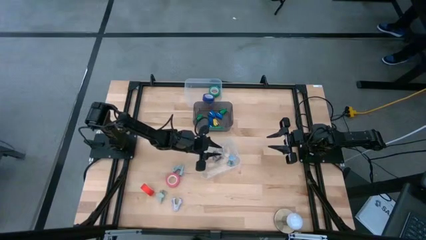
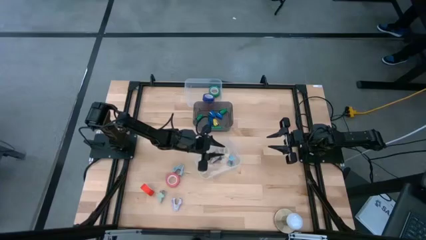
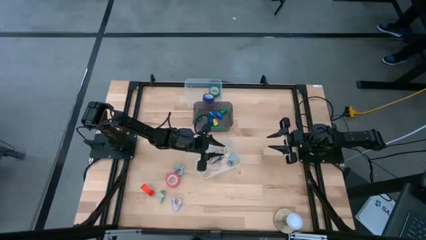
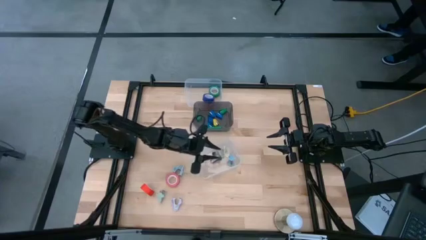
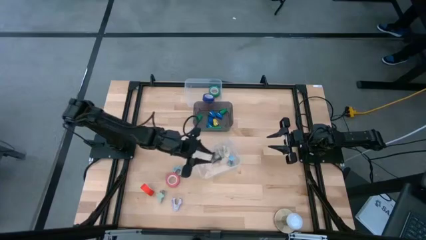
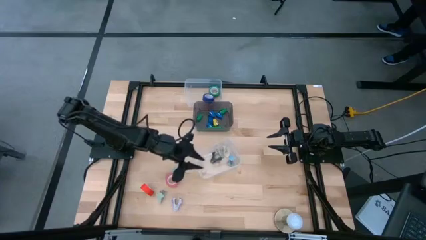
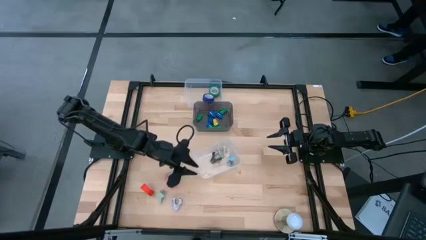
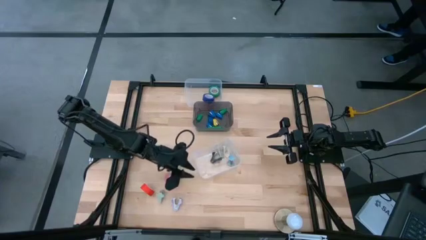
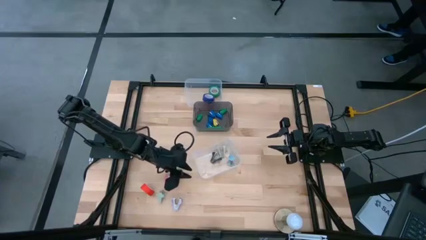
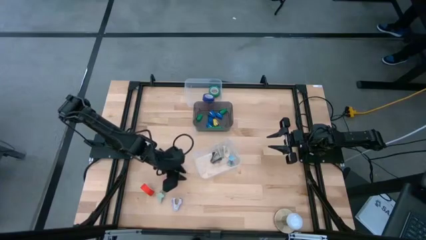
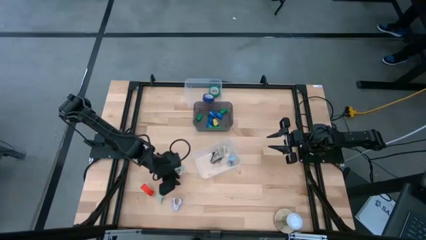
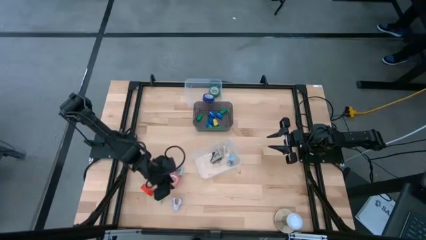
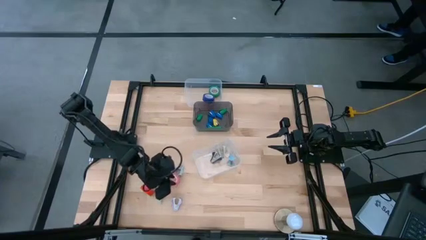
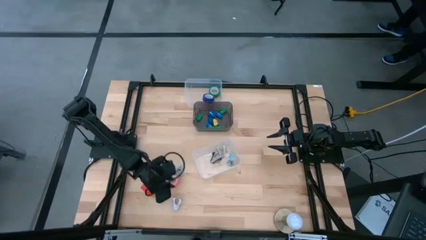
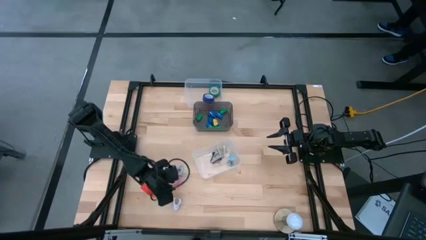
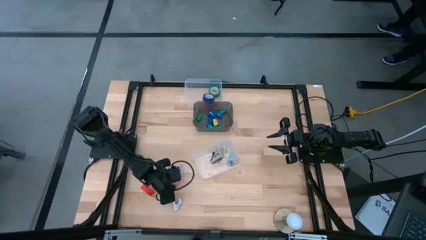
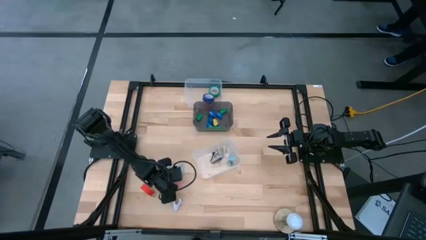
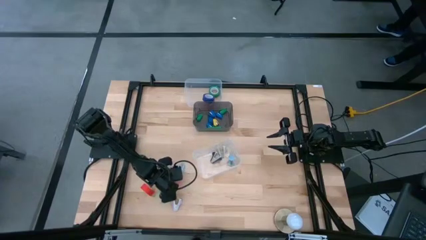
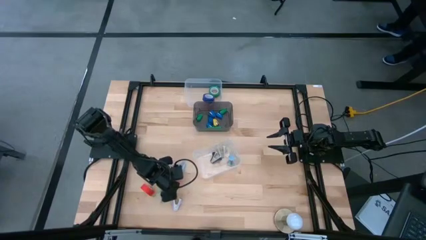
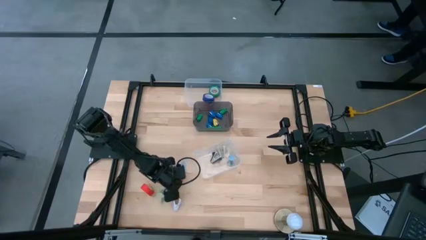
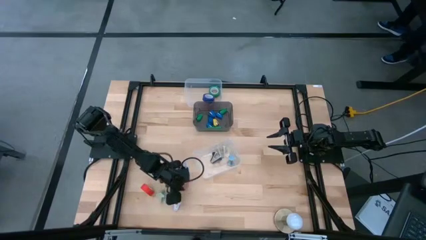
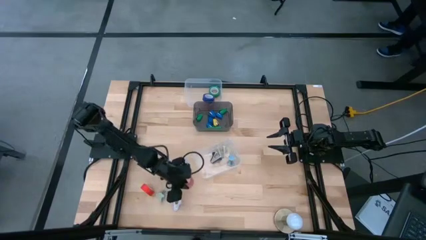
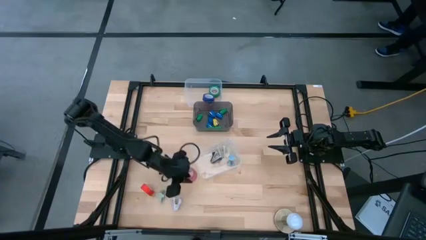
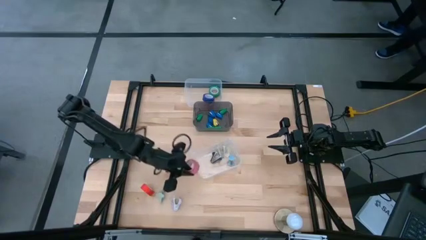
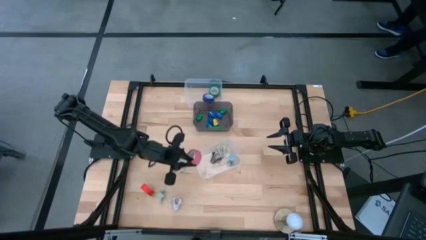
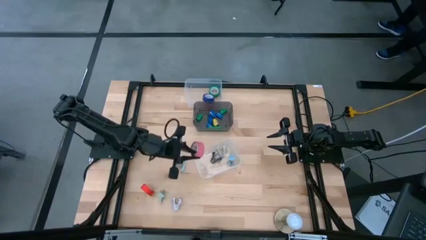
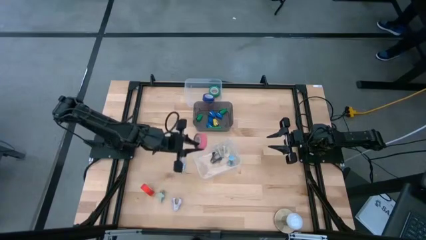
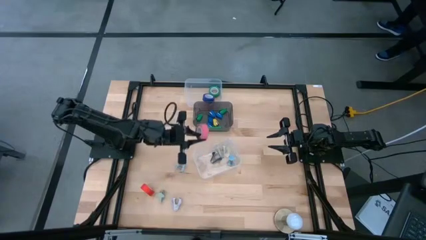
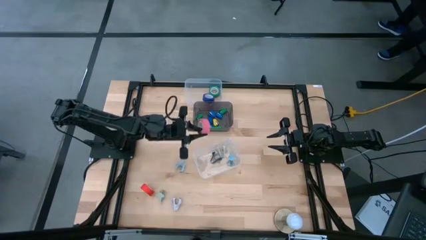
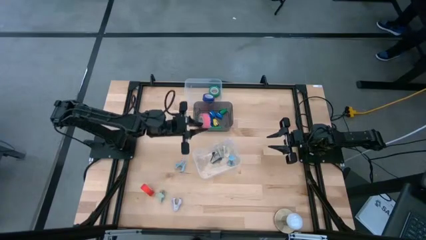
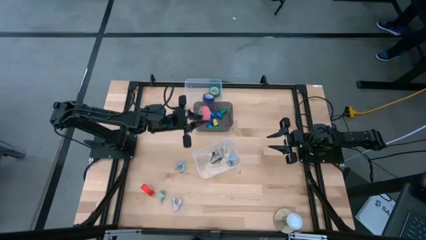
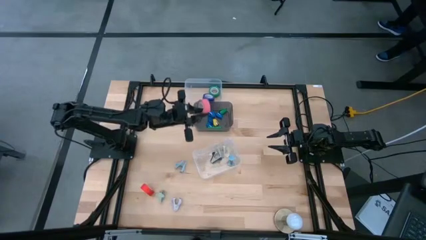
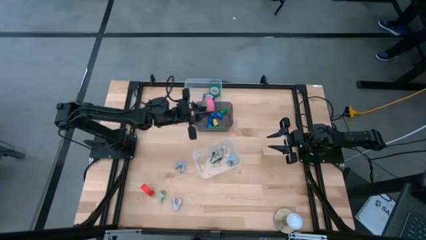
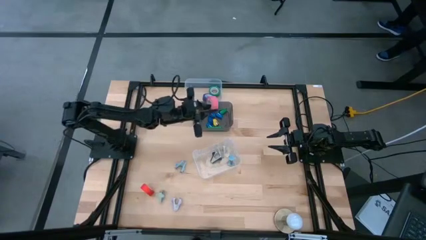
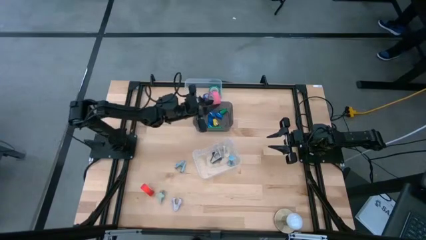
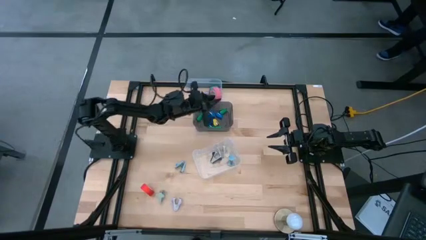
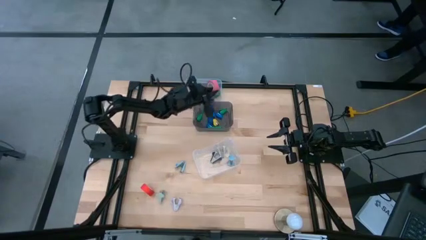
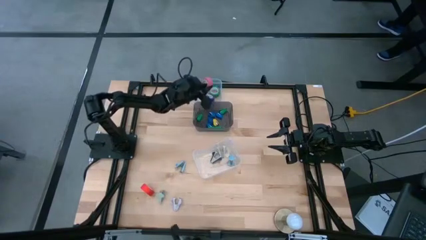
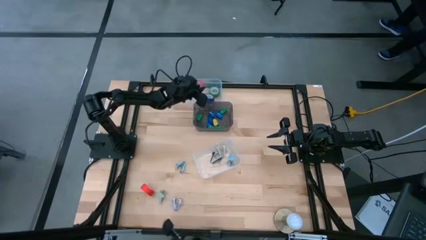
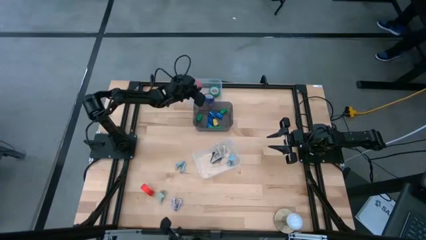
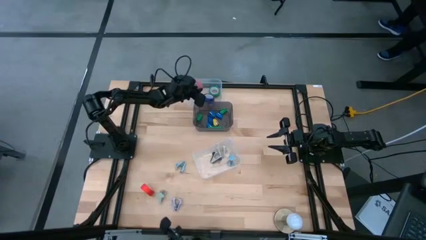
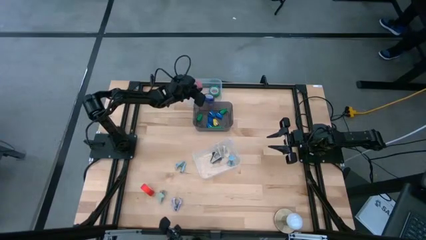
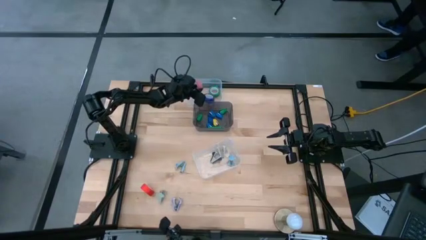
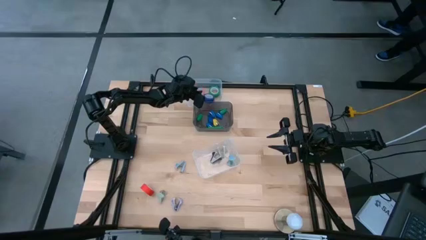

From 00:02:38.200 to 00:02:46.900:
Task: Pick and place Stapler, Stapler remover, tape
Put the pink tape into the top transparent bin

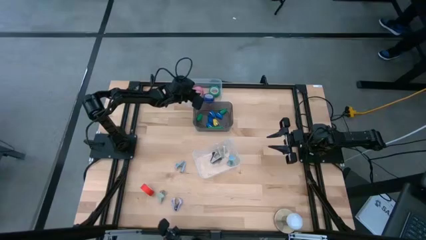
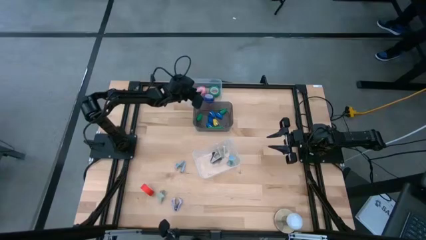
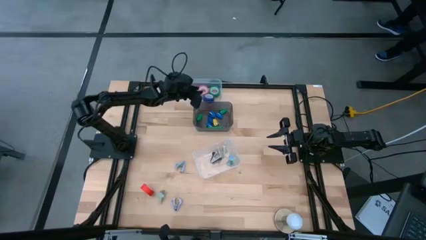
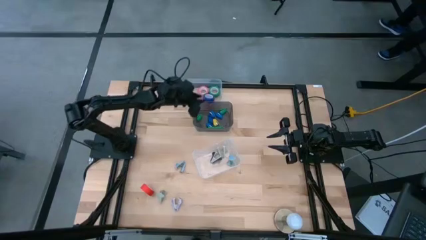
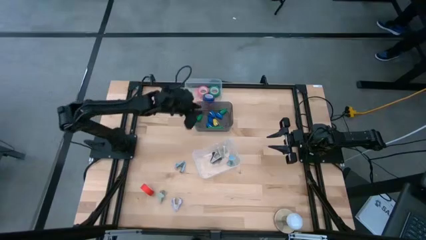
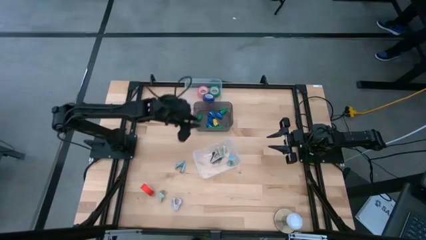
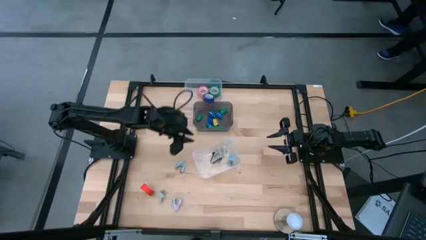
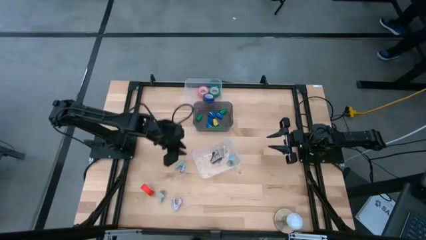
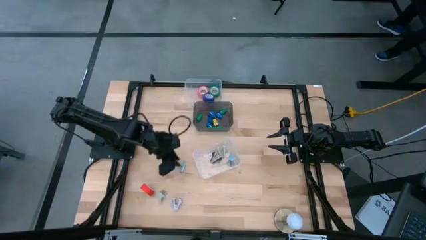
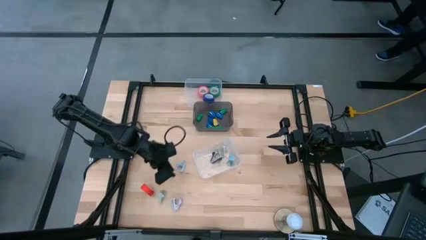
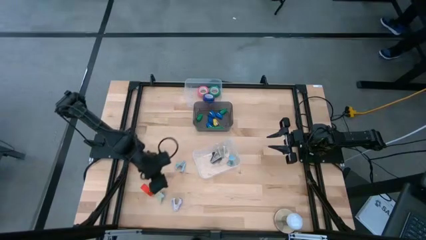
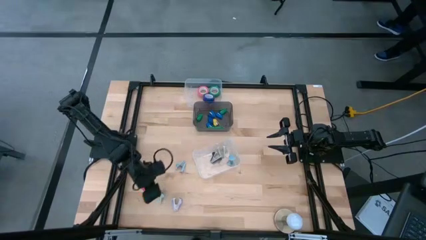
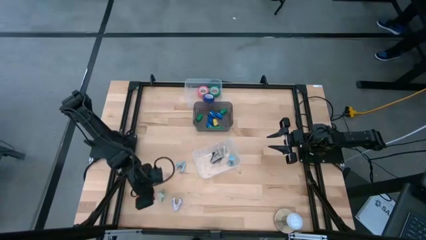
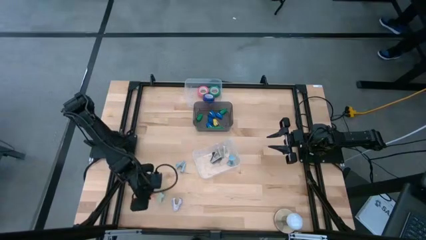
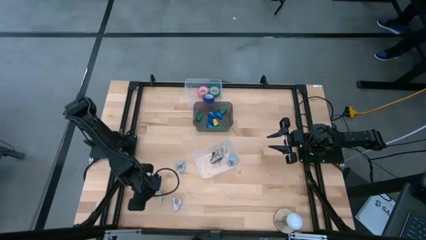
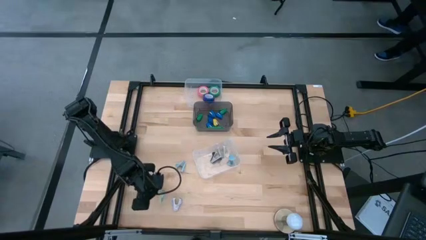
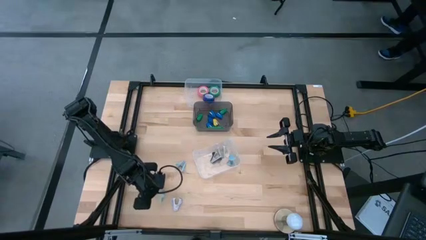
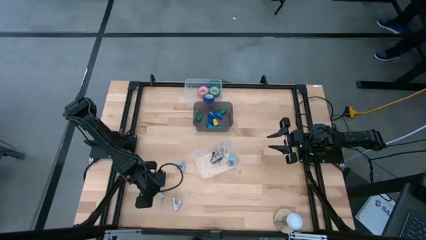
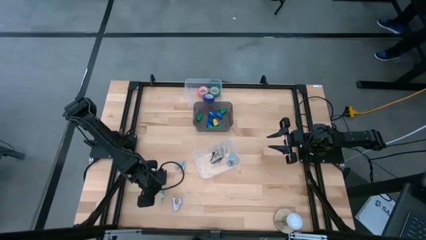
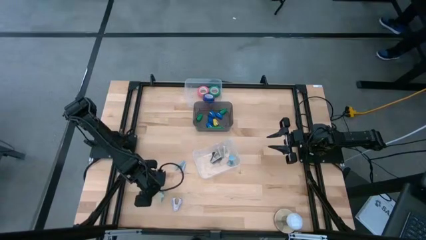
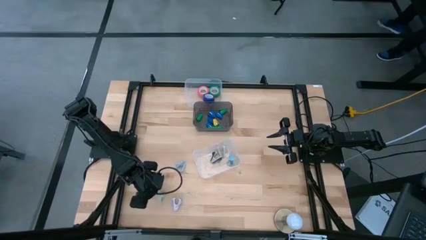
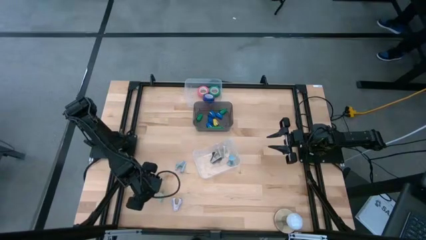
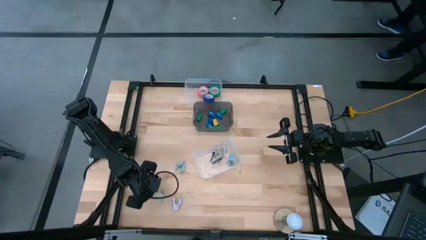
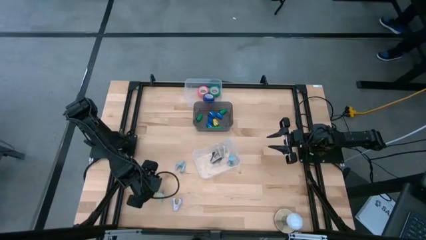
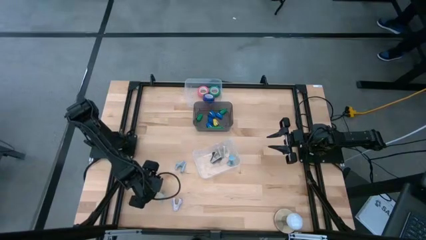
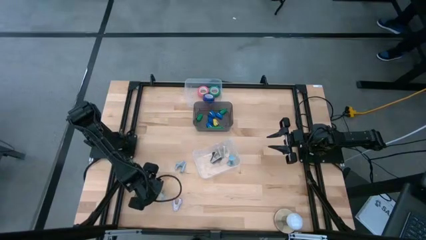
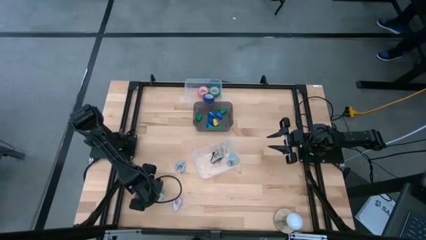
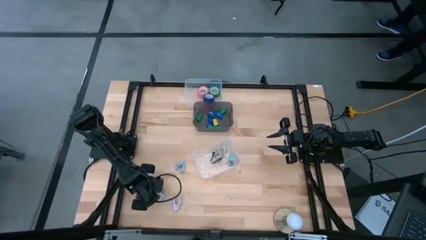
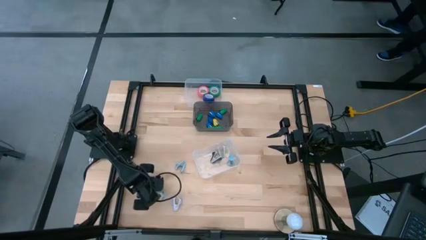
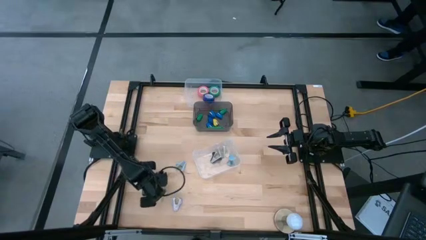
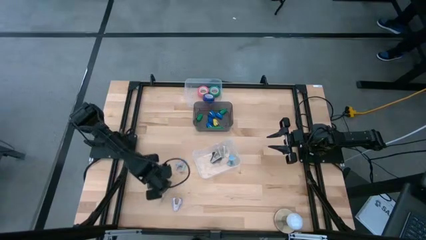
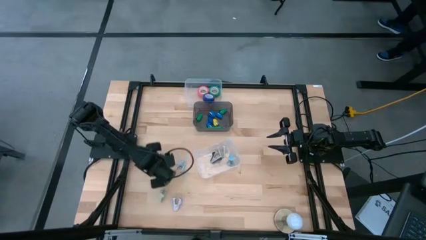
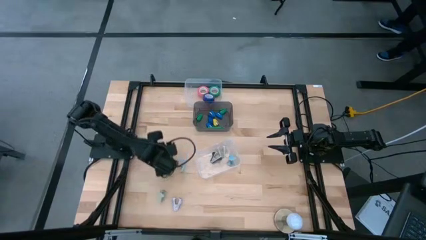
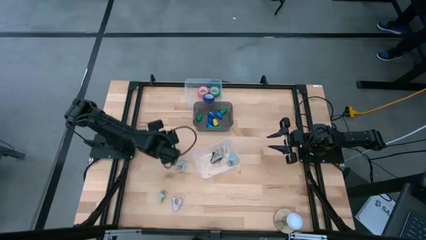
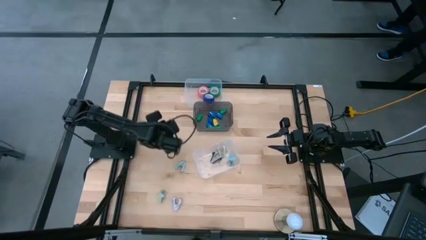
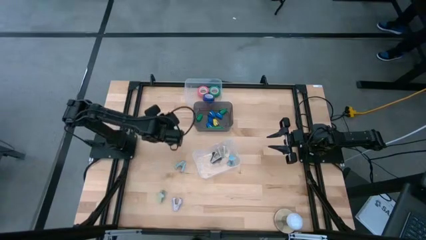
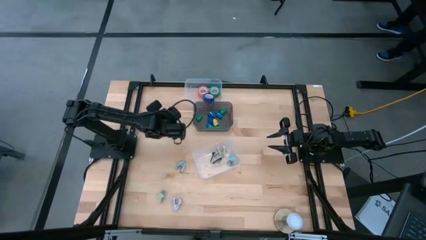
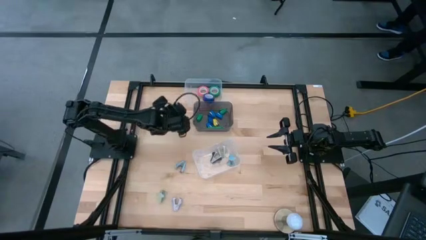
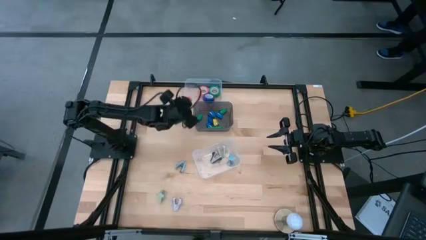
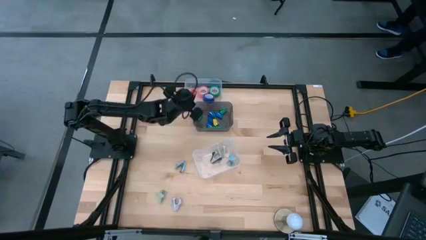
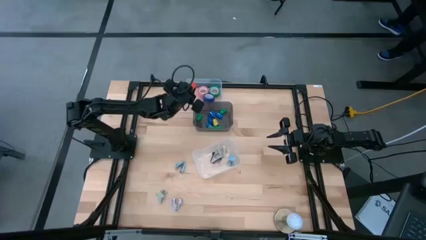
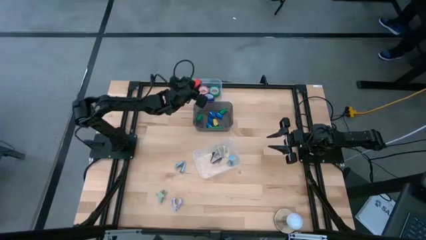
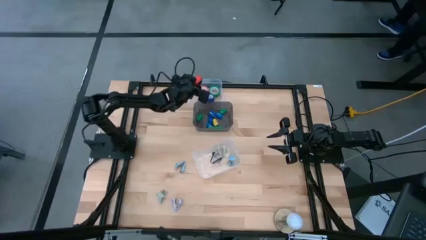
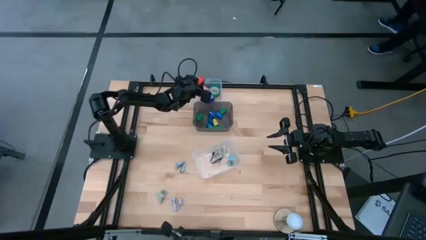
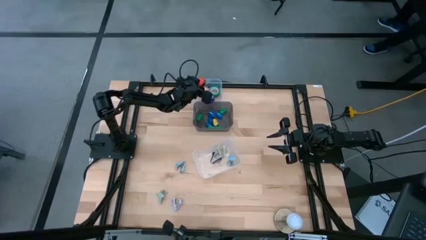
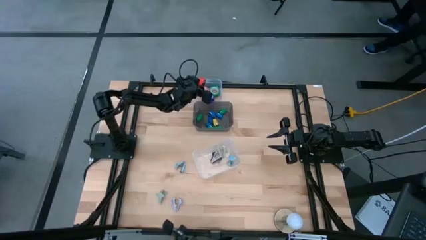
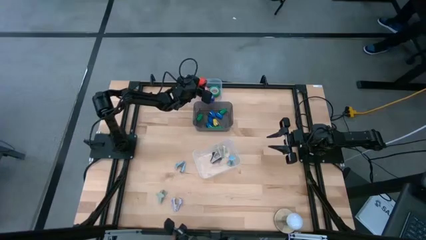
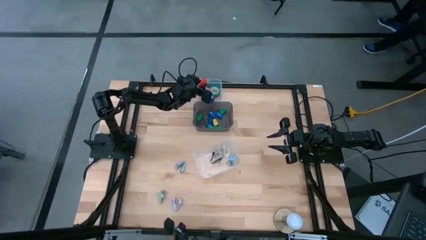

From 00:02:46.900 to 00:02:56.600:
Put the orange tape into the top transparent bin
